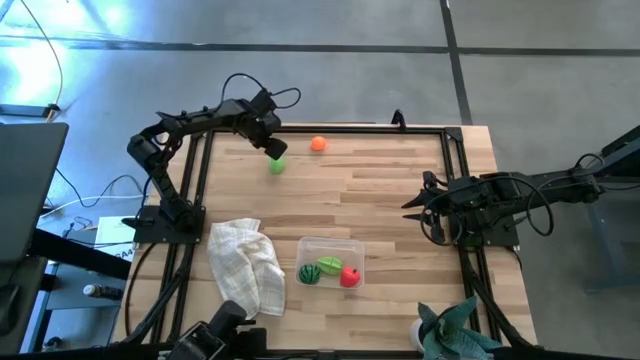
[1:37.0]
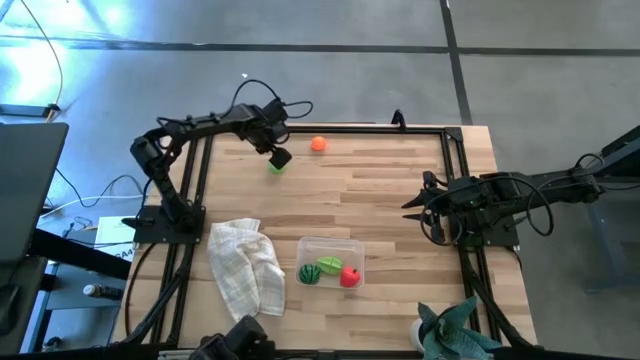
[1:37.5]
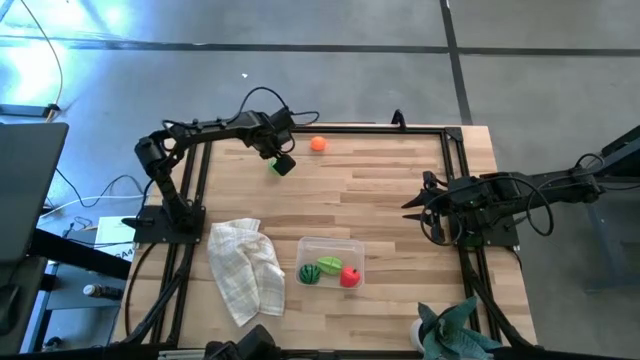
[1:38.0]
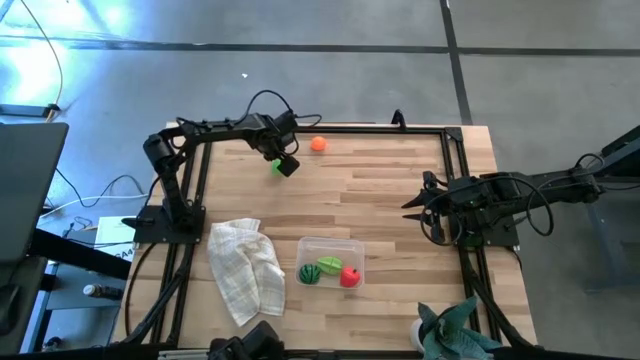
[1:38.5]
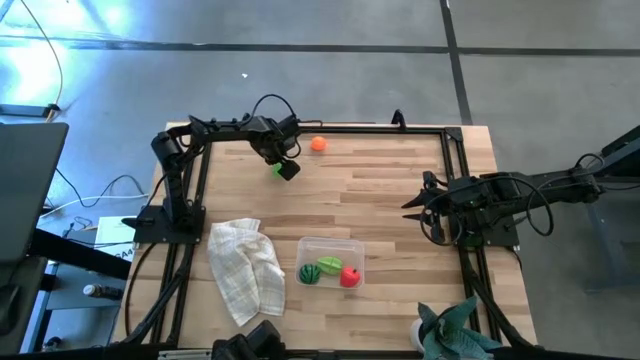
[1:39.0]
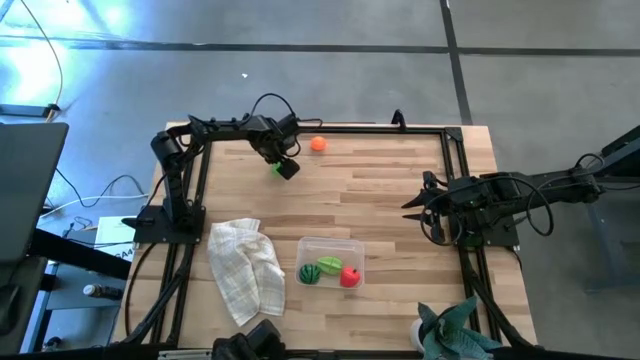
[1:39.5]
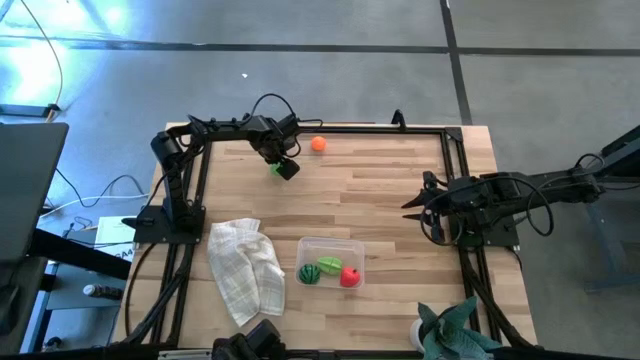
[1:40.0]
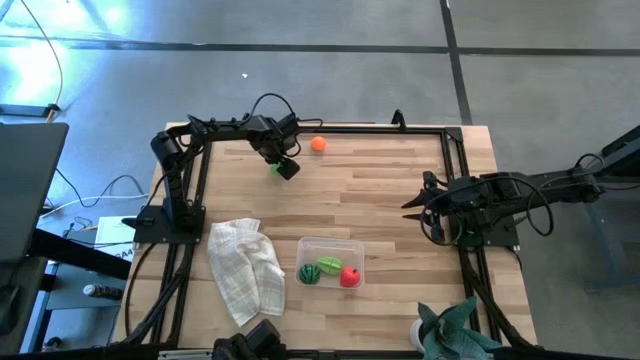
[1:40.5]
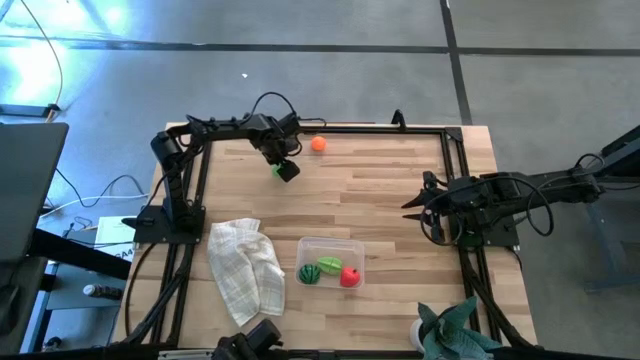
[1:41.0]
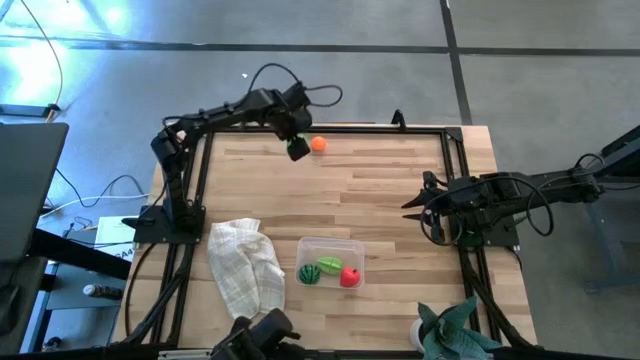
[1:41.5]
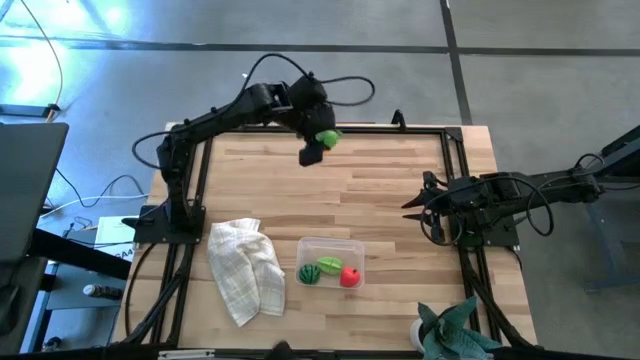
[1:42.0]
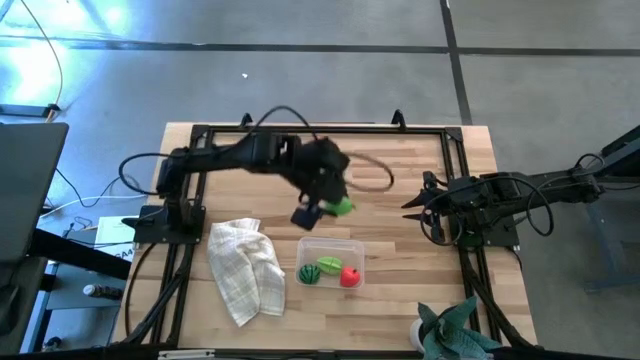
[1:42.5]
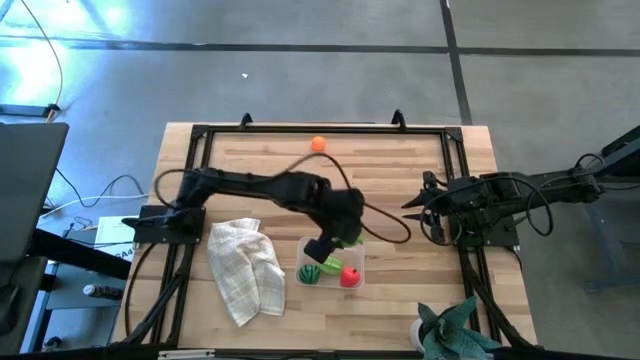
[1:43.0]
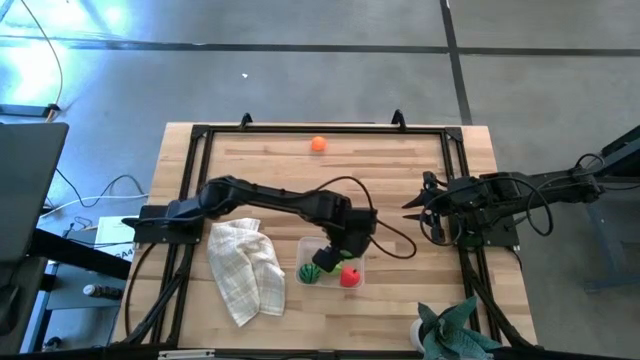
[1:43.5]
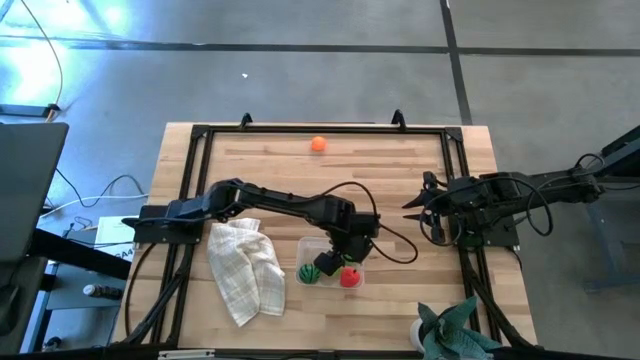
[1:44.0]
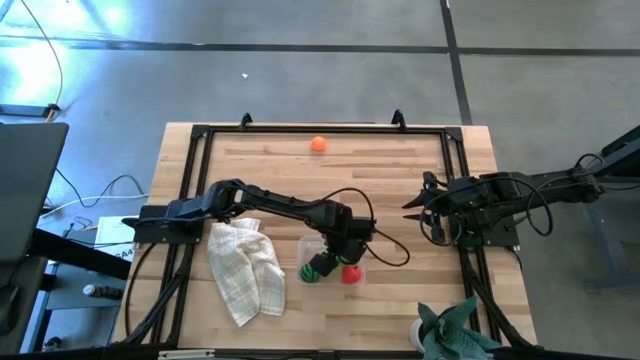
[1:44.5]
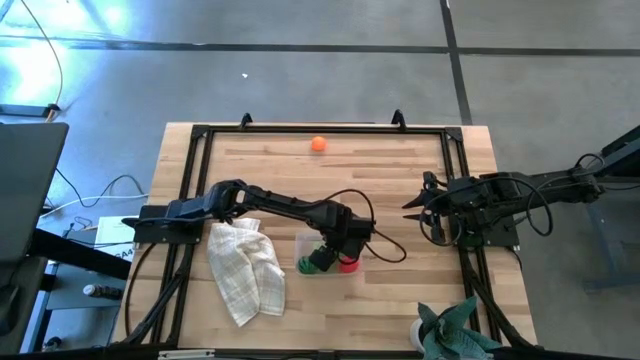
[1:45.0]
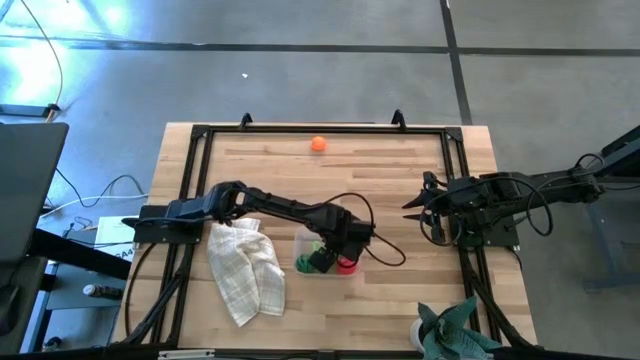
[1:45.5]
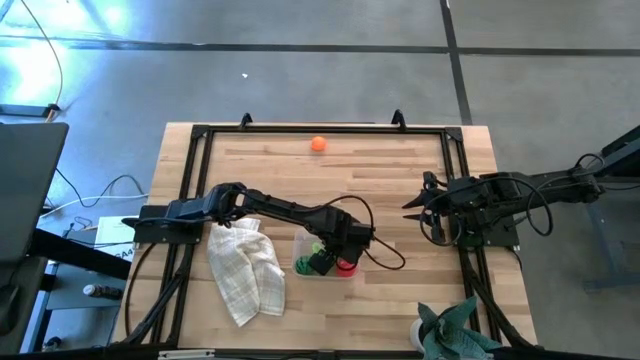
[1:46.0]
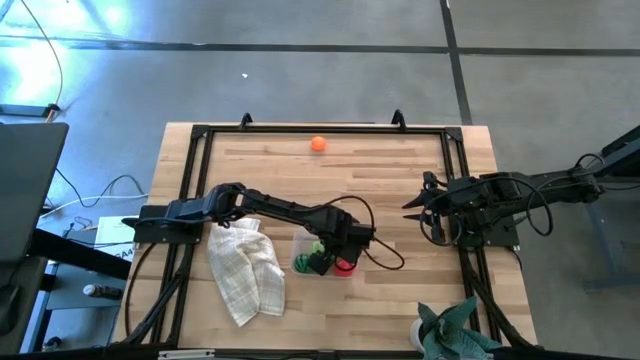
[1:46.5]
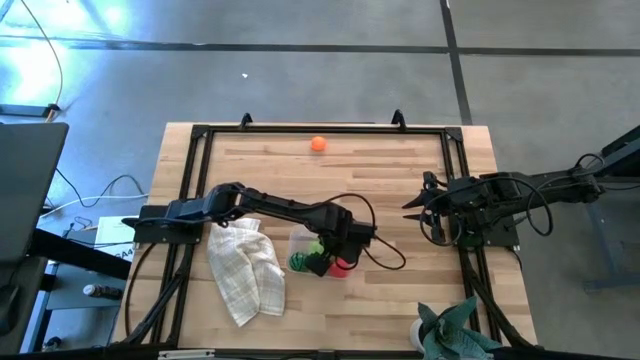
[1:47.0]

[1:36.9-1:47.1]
Task: Pick and placing Produce into tupperware
Put the green melon into the transparent bin

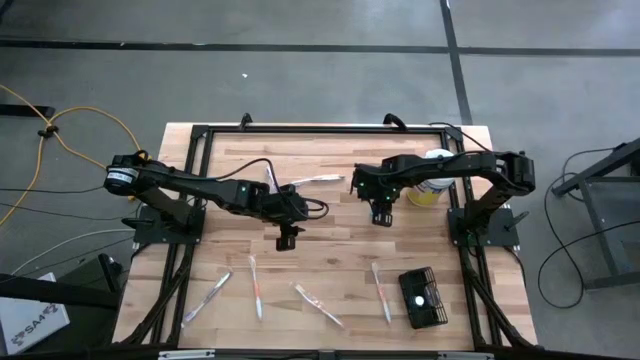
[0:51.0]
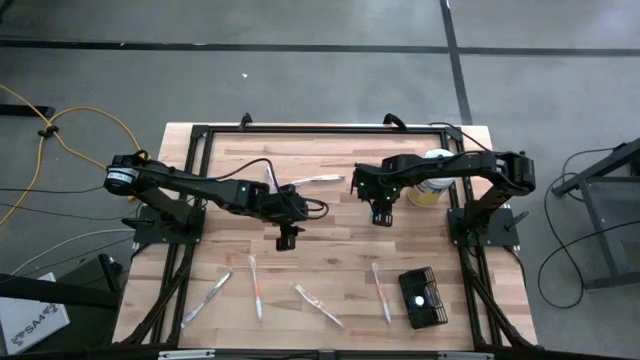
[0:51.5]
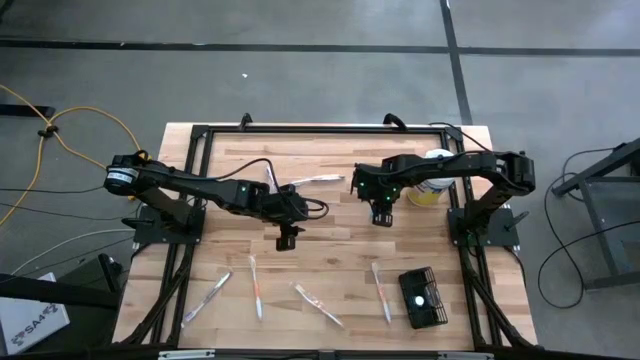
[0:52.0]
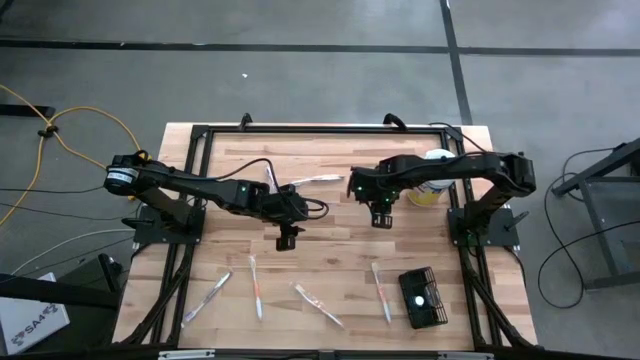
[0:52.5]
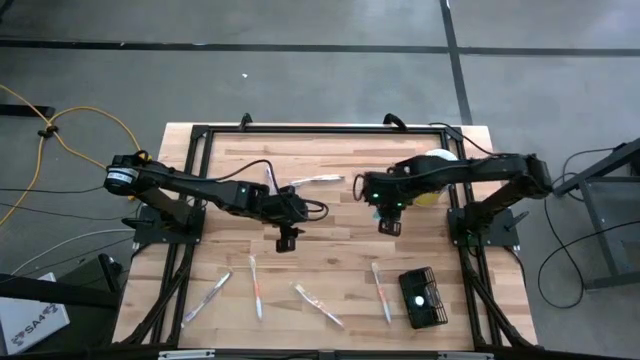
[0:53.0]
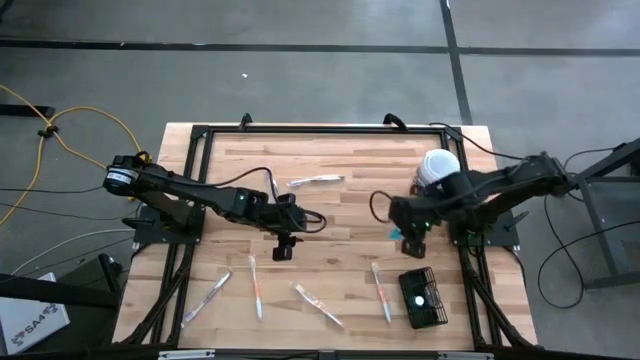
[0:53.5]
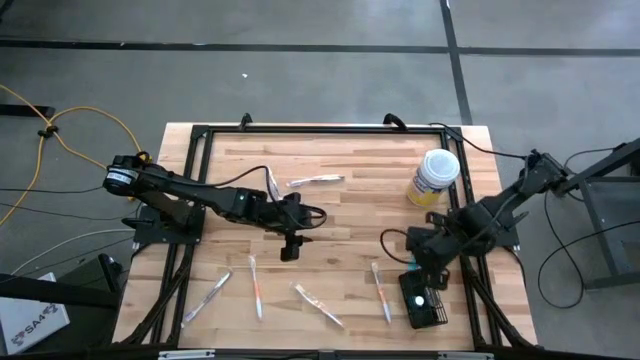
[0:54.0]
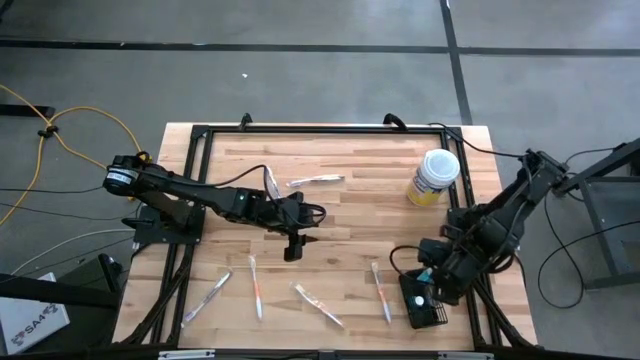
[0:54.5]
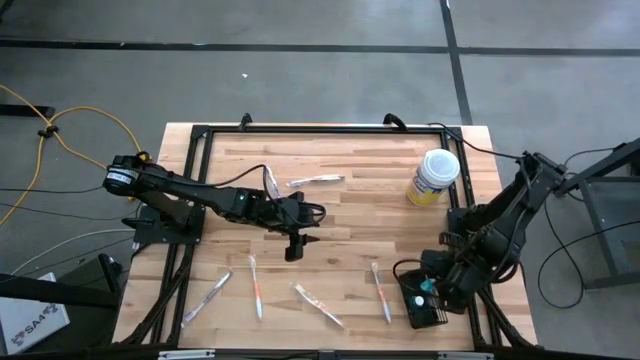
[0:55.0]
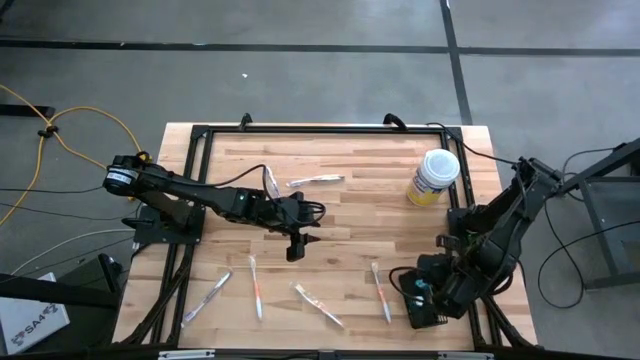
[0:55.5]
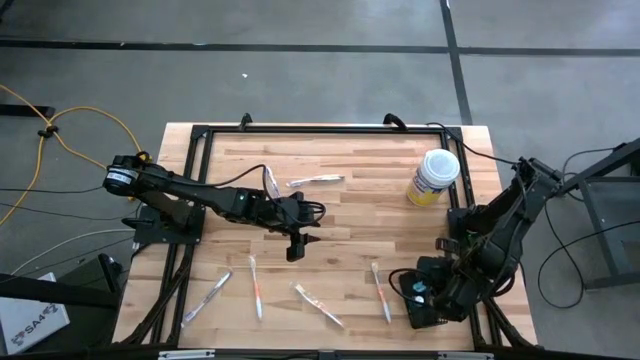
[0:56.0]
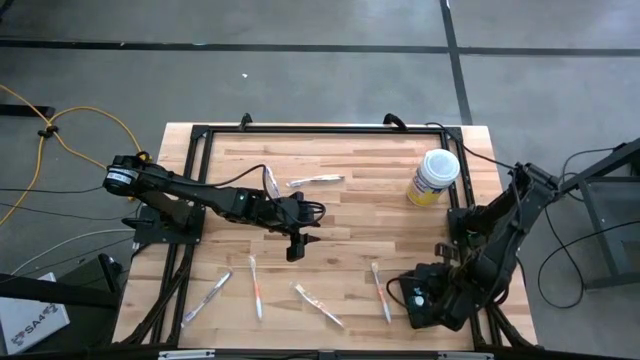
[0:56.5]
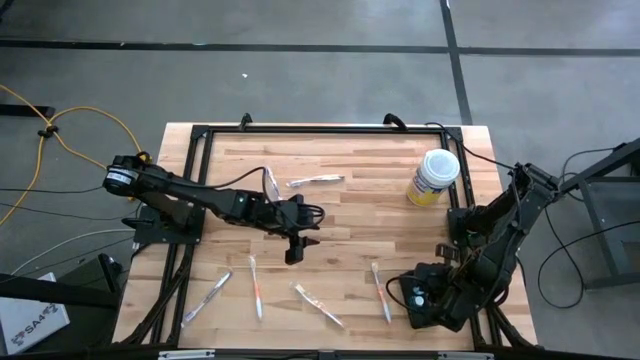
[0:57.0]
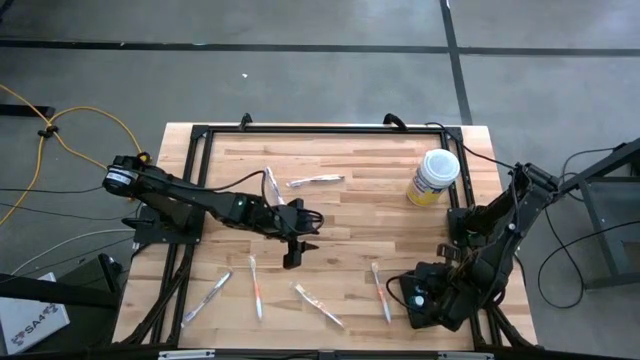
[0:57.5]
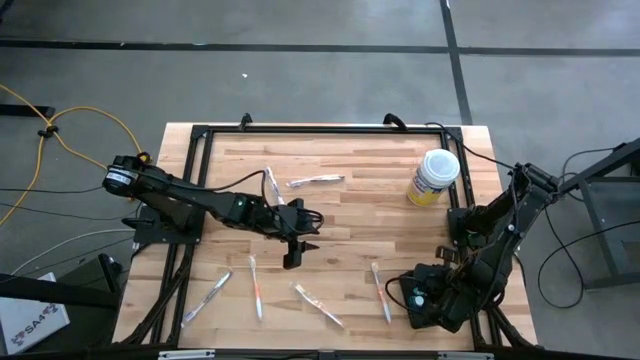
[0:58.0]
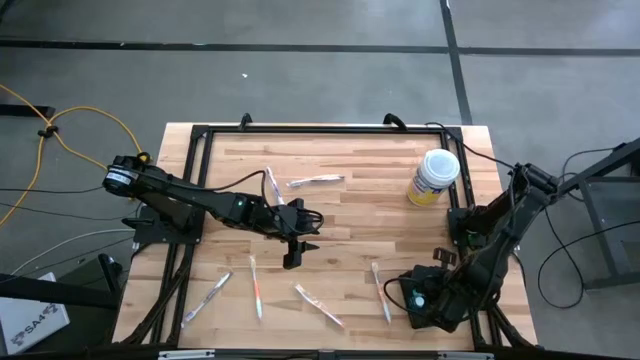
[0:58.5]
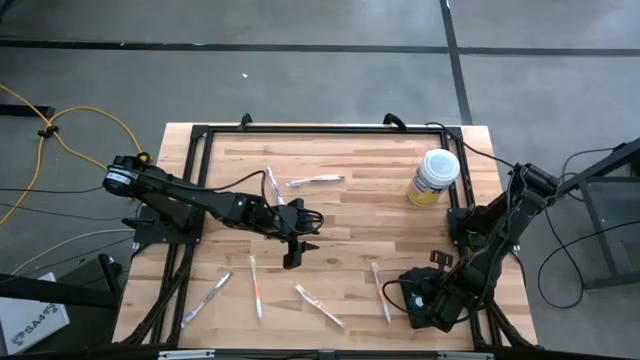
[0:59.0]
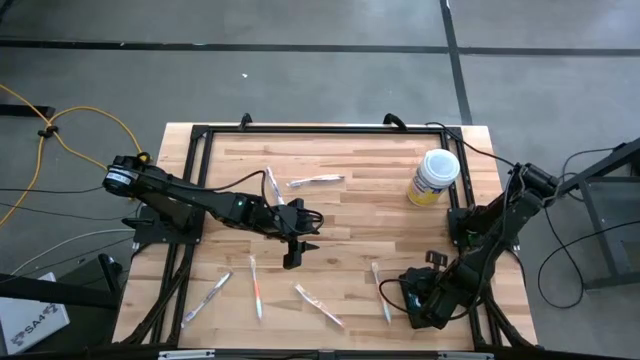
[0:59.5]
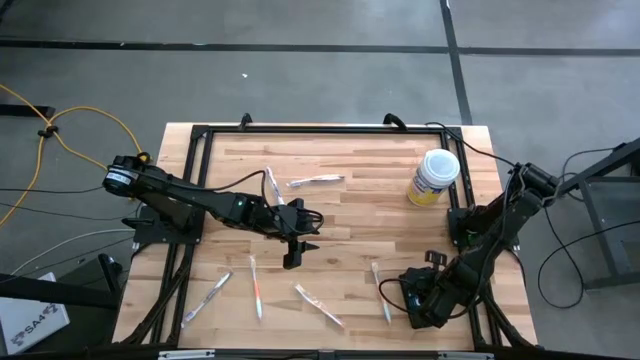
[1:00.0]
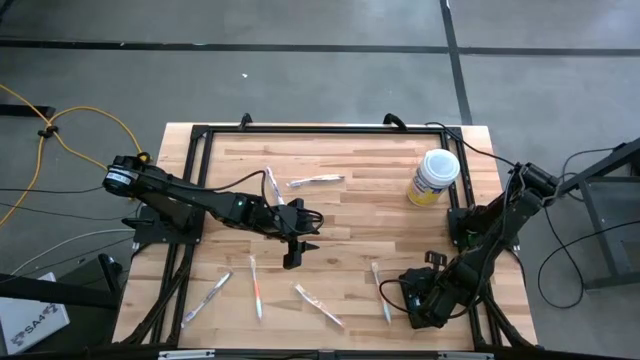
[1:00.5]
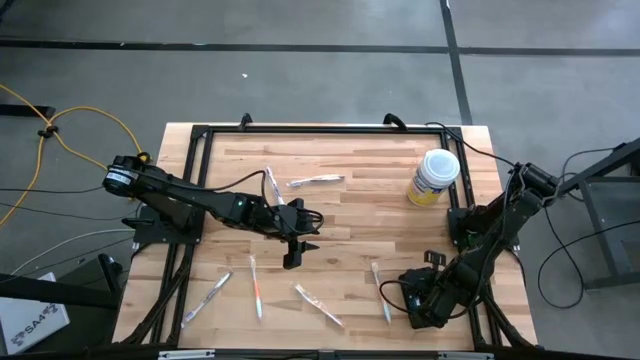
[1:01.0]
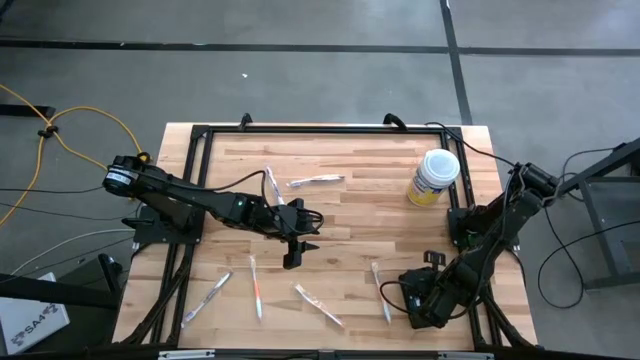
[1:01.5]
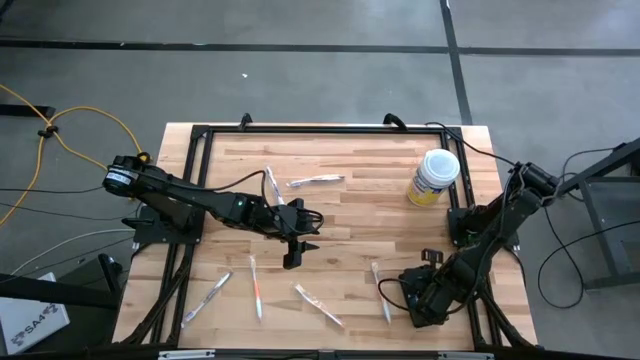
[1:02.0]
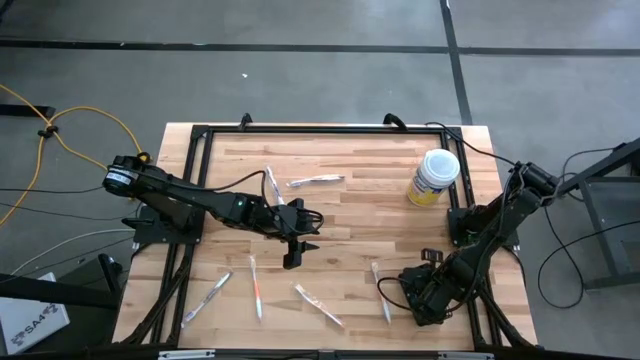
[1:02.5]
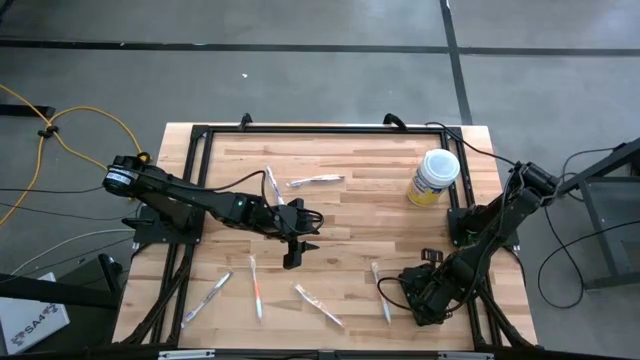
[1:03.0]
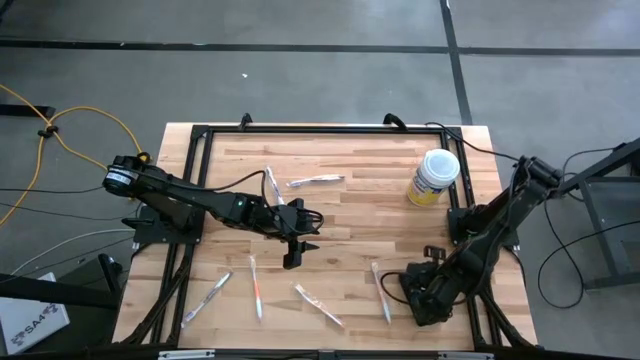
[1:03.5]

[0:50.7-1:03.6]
Task: Pick & Place toothbrushing station
Put the blue mouthwash into the mesh organizer
